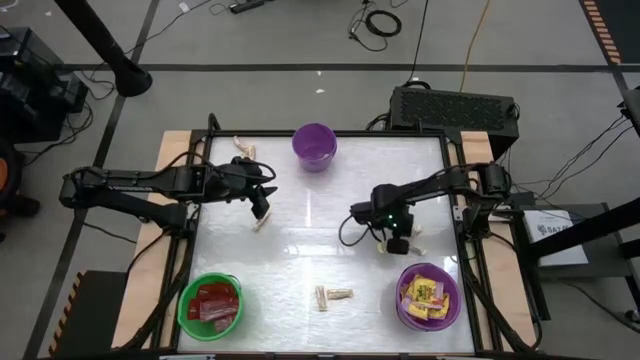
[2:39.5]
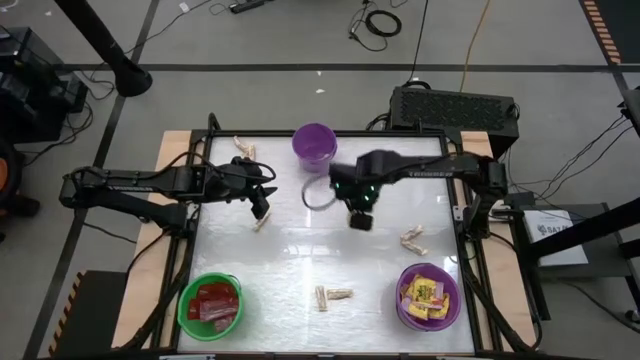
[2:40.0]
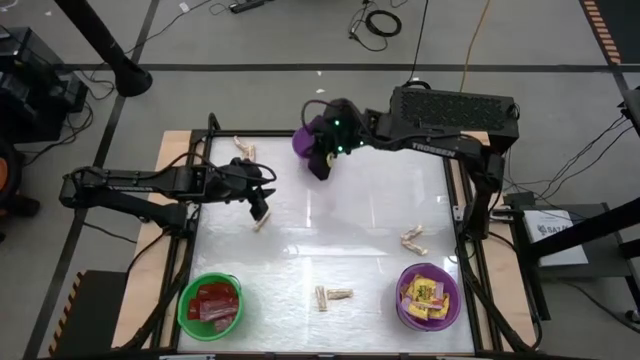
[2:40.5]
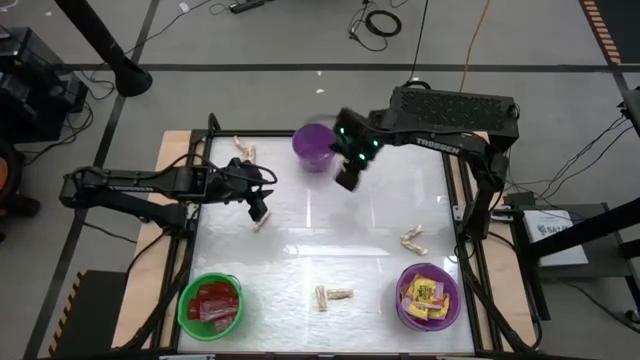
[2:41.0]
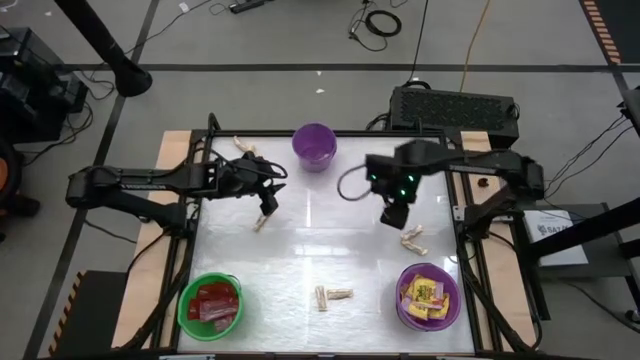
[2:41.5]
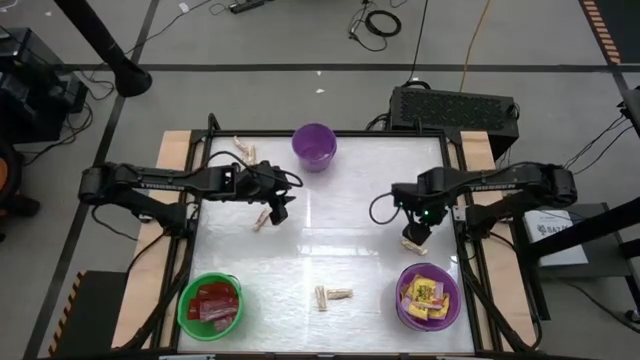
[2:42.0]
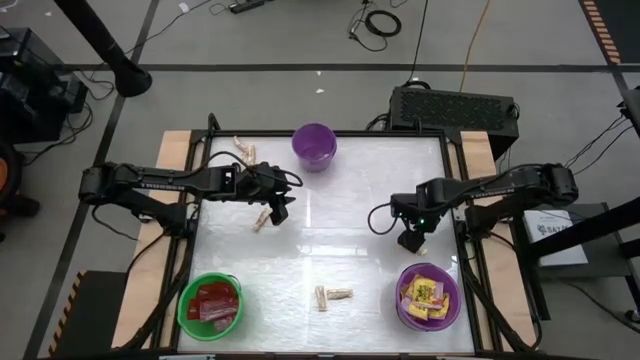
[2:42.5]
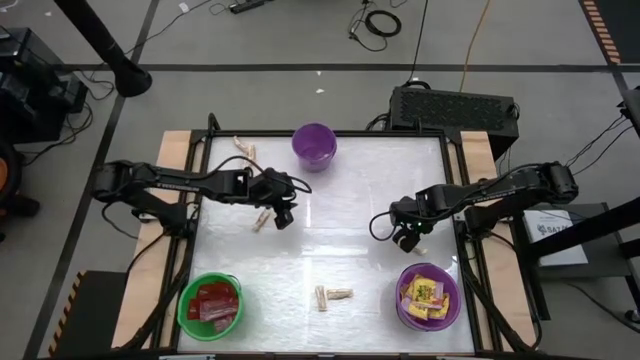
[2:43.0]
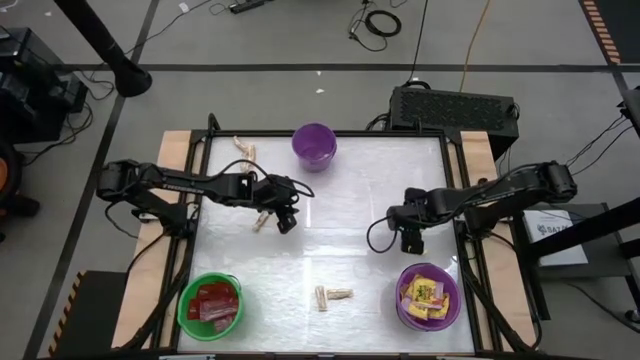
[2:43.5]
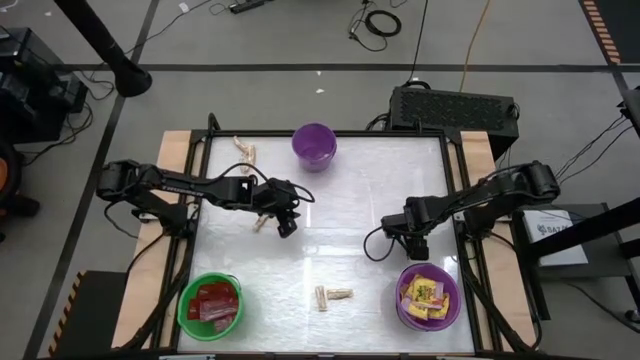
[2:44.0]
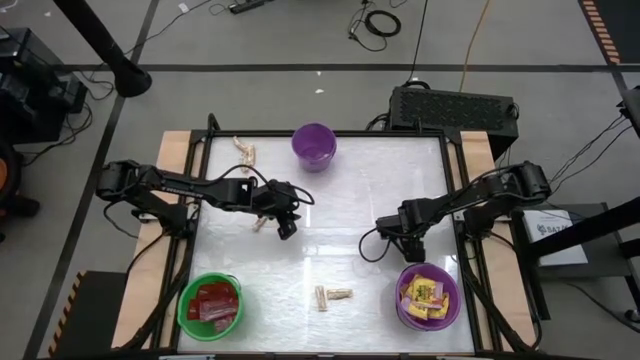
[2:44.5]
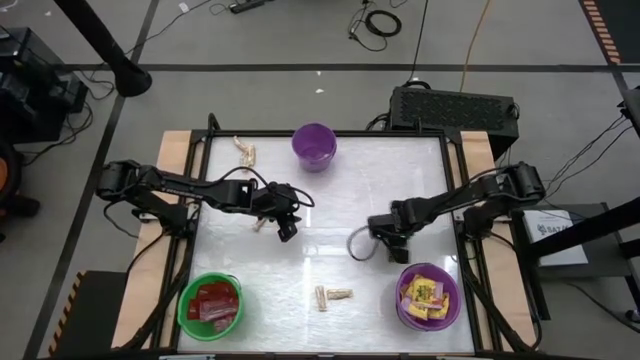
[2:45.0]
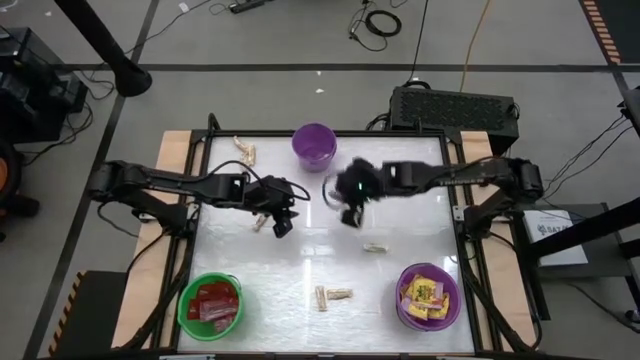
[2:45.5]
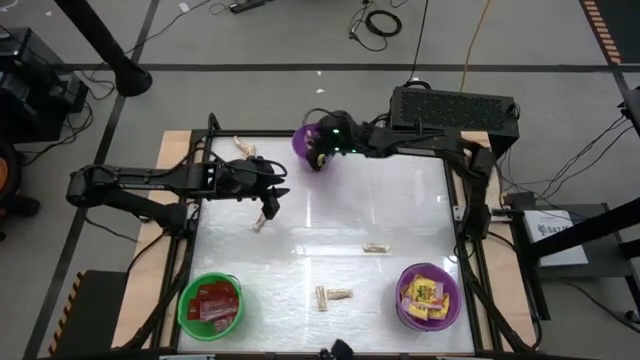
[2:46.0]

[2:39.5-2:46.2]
Task: Sort candy by brand, put in halloween buckets
Put the white chocolate into the top purple bucket

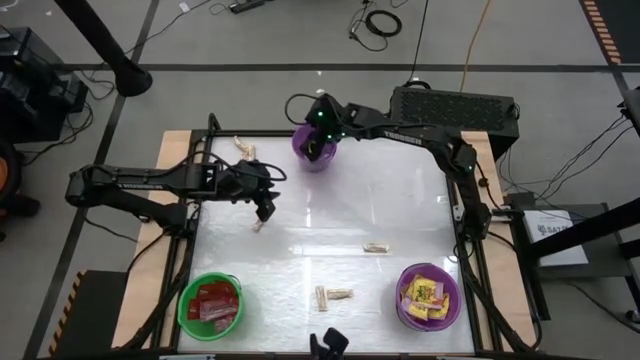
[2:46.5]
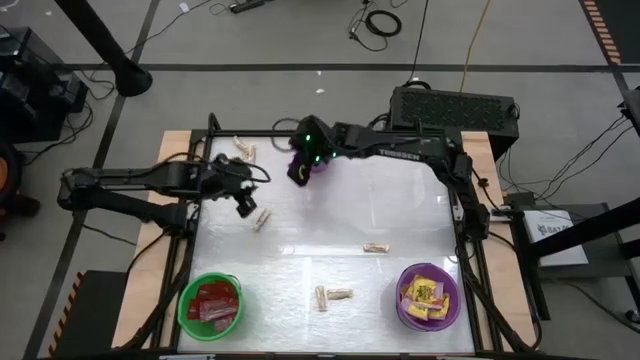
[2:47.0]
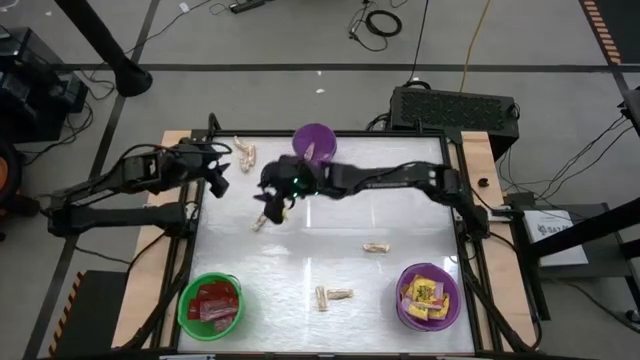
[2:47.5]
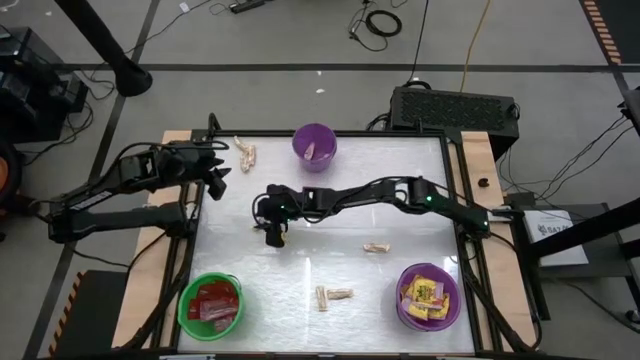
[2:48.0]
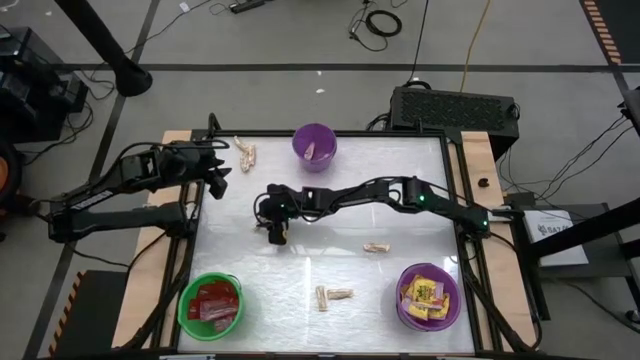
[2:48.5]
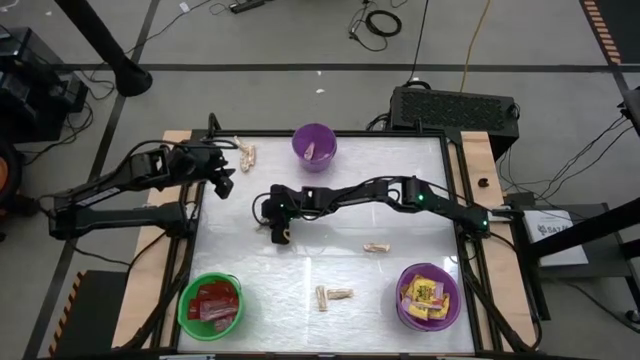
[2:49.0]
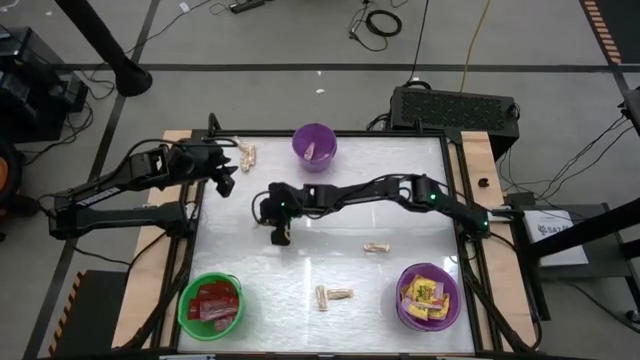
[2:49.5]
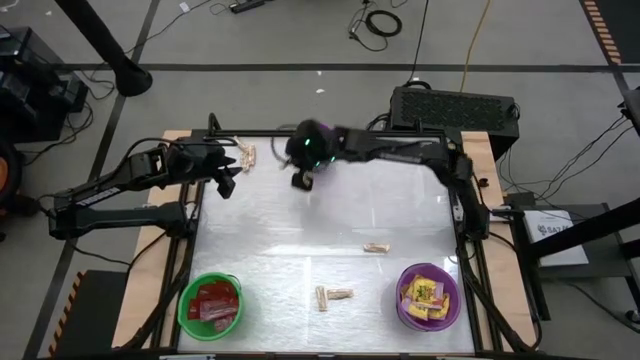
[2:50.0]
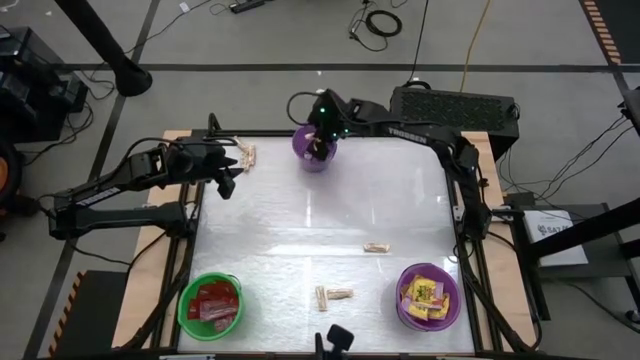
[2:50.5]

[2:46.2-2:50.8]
Put the white chocolate into the top purple bucket

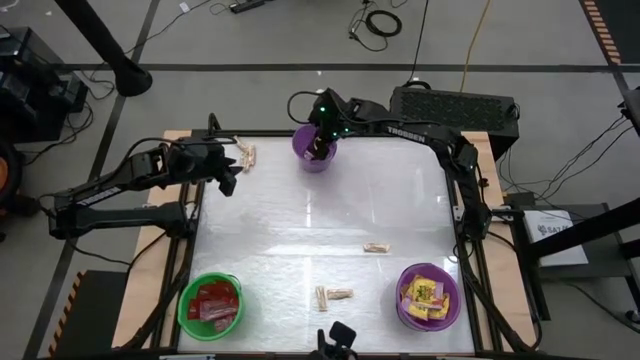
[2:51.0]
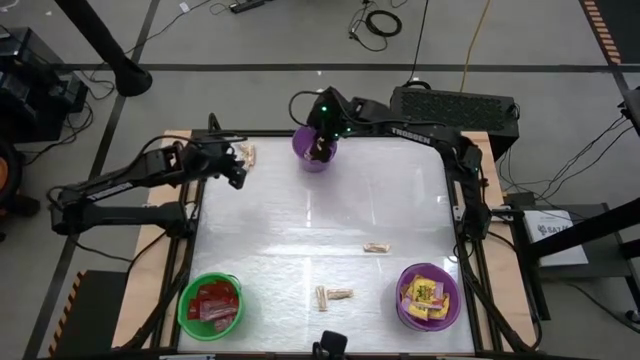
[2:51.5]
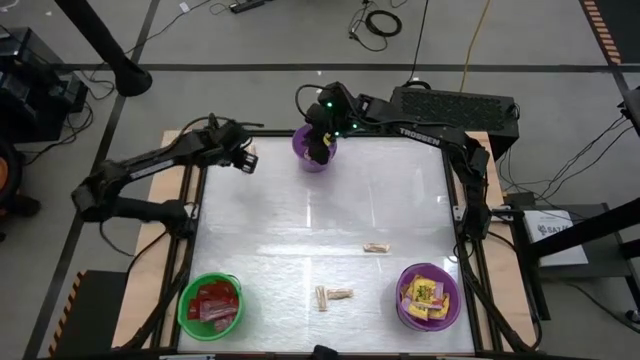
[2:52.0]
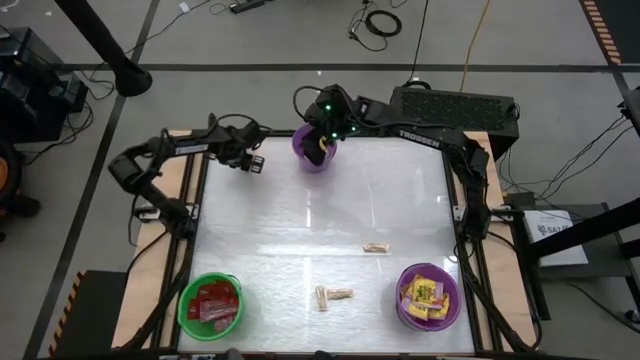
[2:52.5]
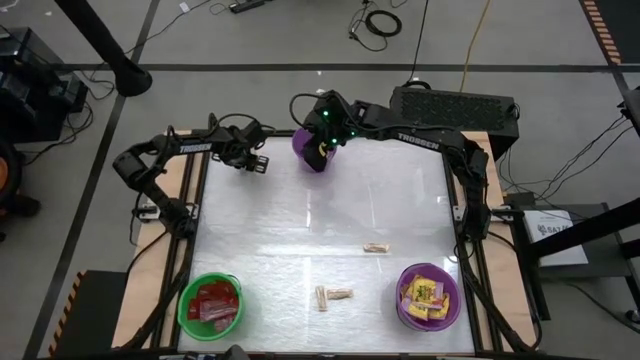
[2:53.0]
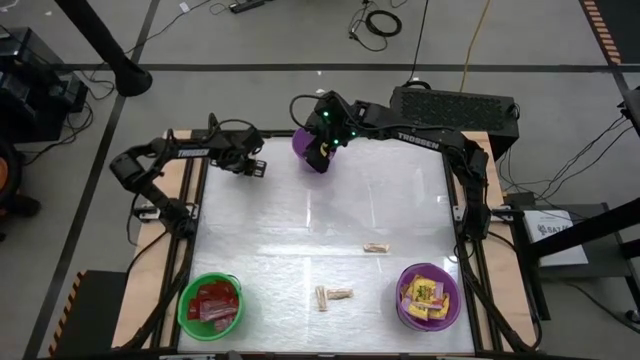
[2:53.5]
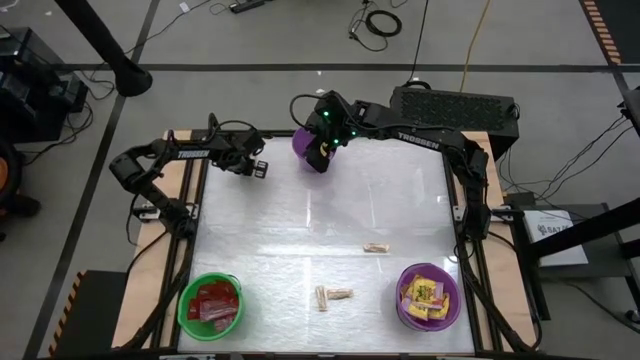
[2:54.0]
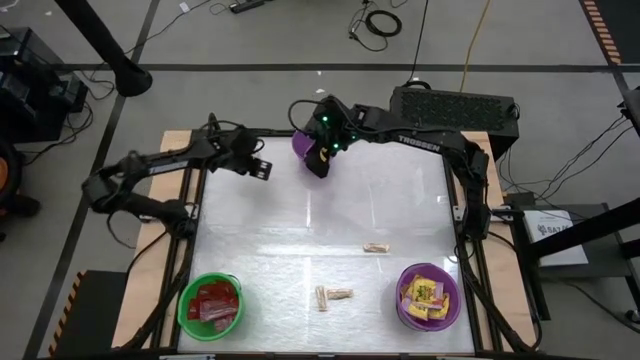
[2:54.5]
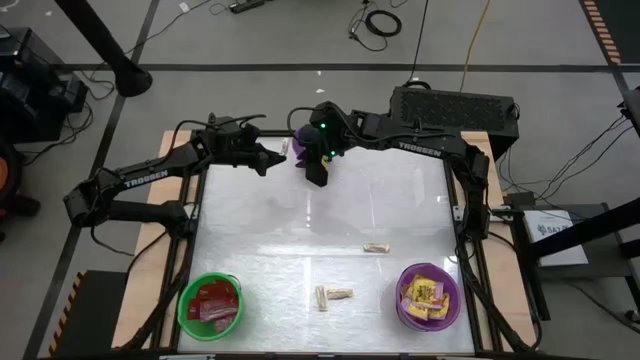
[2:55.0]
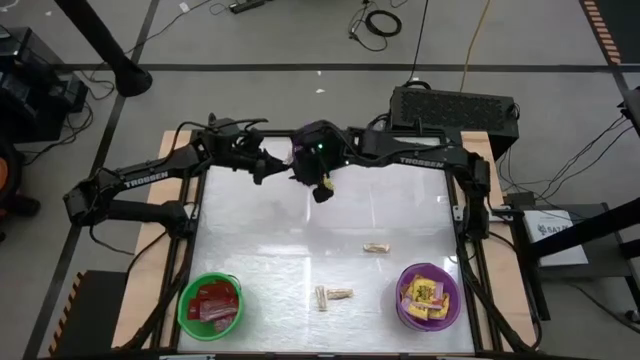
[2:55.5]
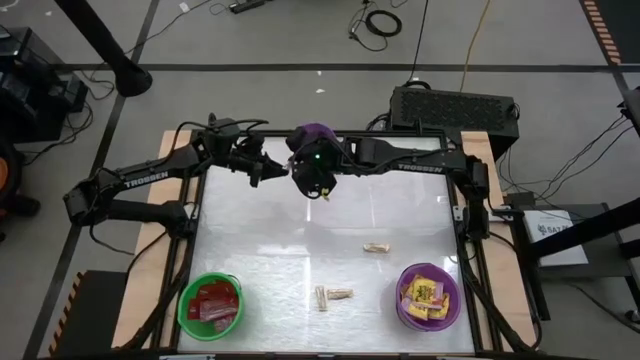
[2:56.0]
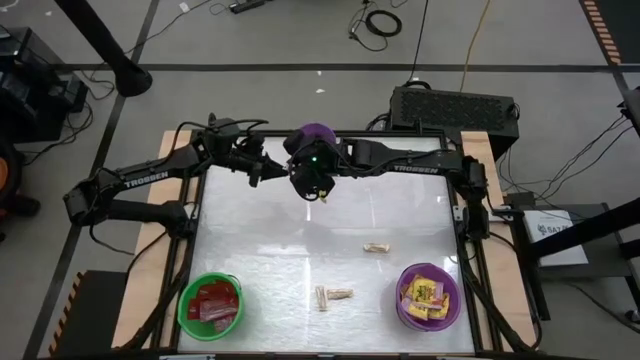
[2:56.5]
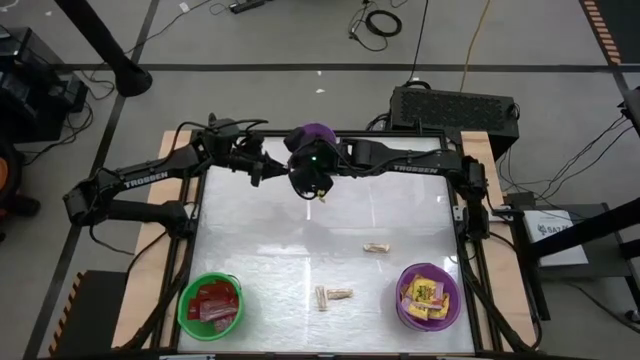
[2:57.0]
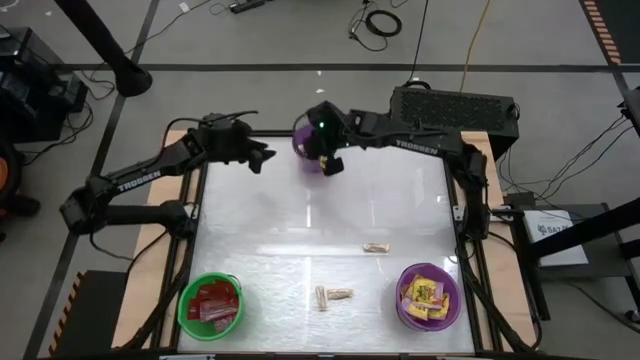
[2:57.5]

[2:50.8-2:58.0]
Put the white chocolate into the top purple bucket

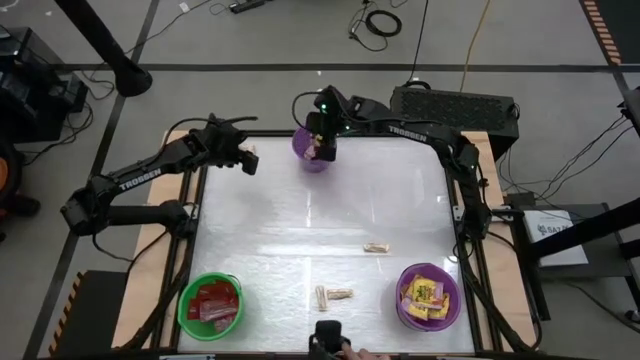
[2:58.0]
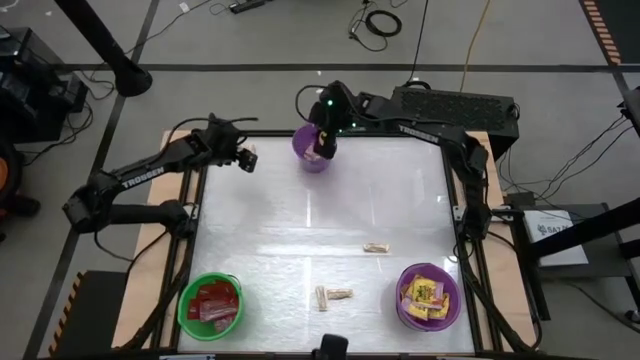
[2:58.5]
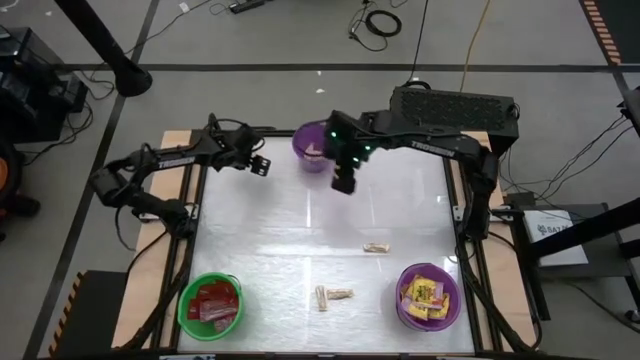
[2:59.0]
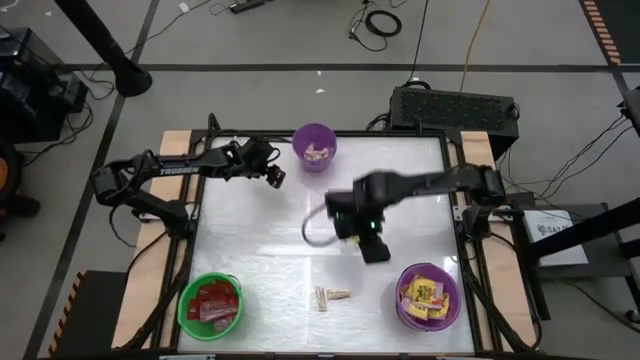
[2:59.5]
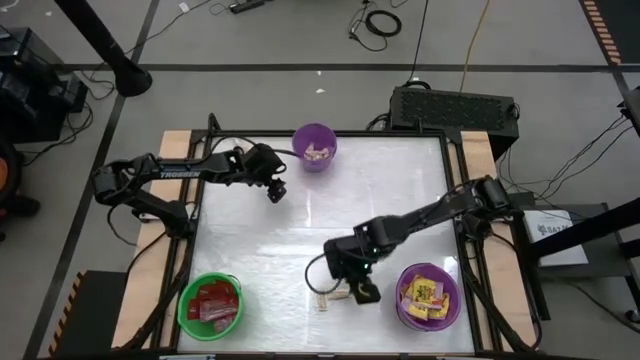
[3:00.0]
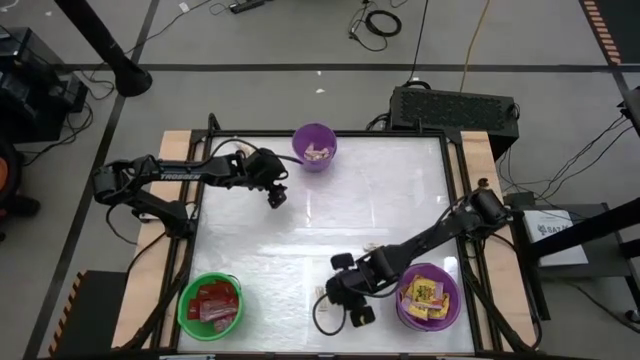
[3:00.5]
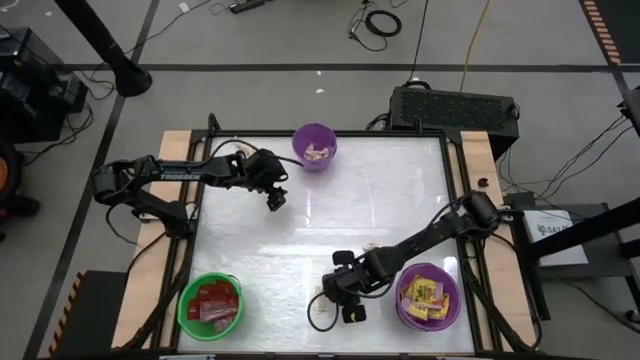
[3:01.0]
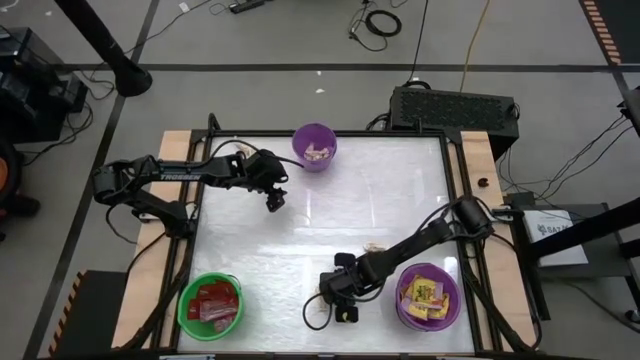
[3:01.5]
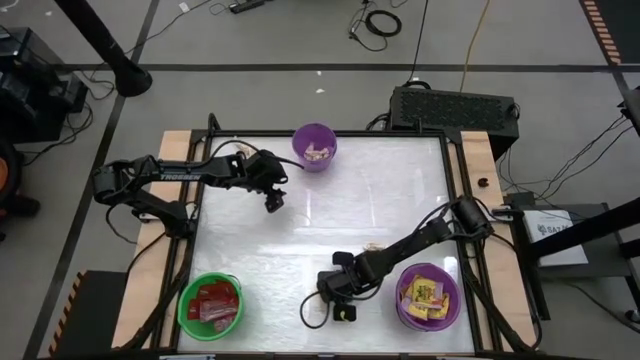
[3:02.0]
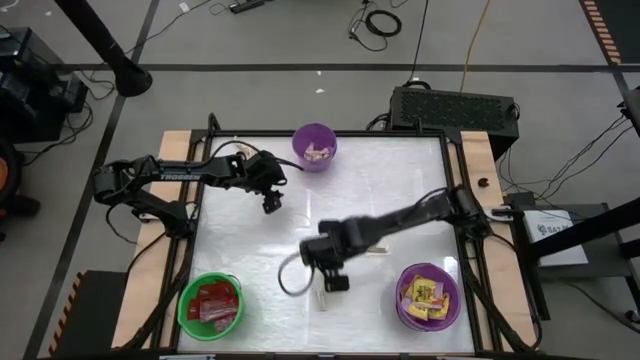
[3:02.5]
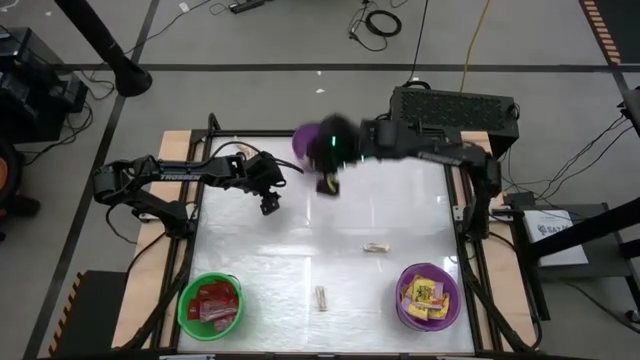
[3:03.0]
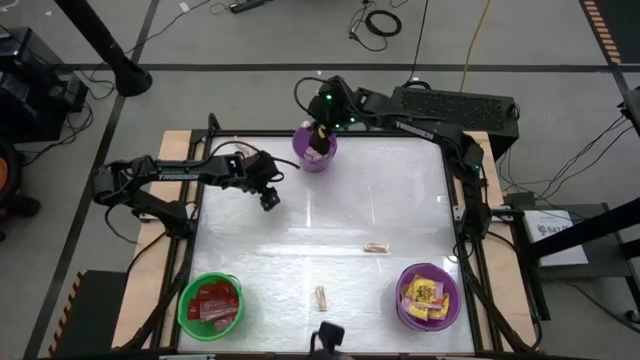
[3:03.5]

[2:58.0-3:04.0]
Put the white chocolate into the top purple bucket
